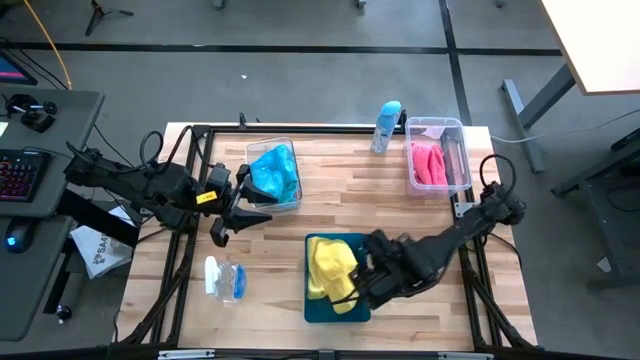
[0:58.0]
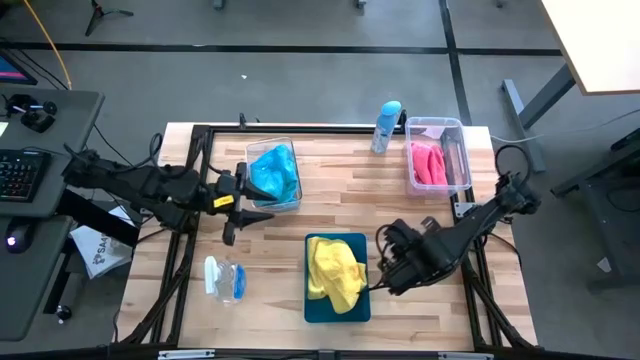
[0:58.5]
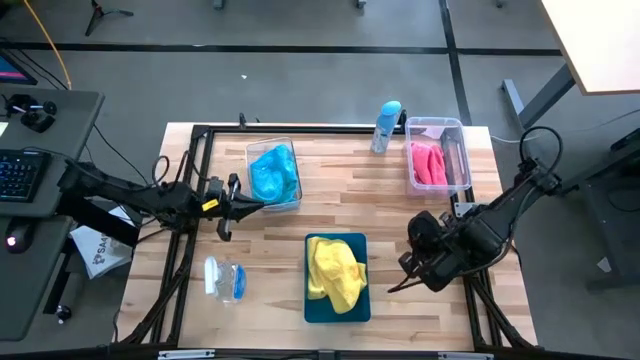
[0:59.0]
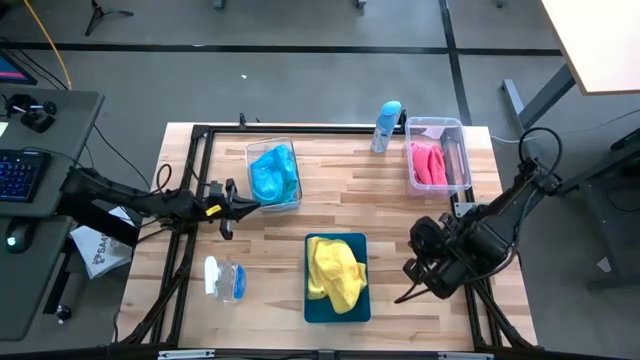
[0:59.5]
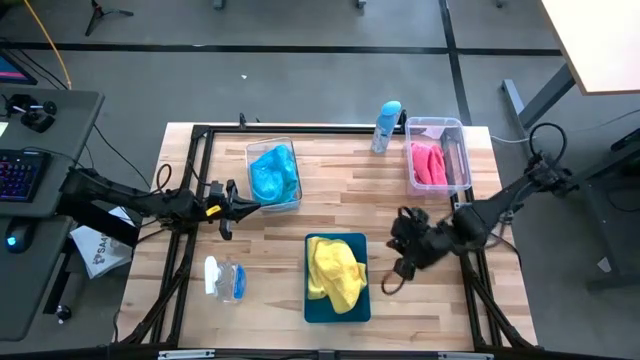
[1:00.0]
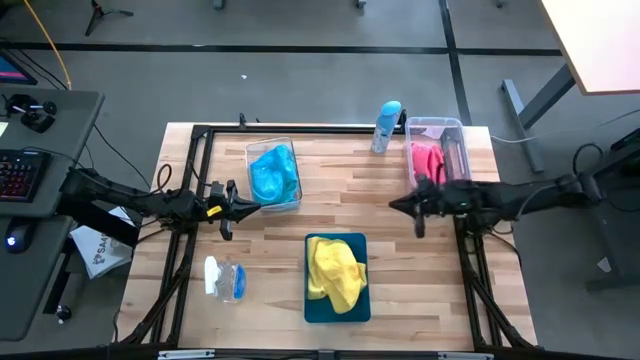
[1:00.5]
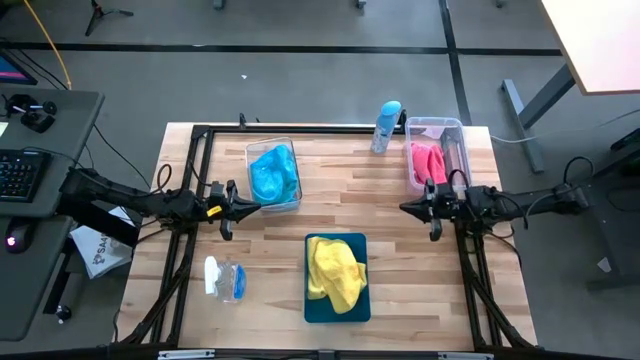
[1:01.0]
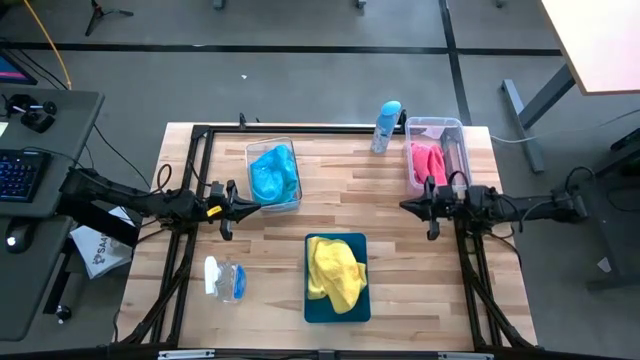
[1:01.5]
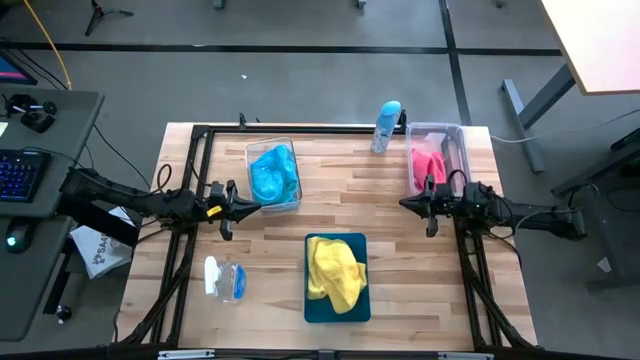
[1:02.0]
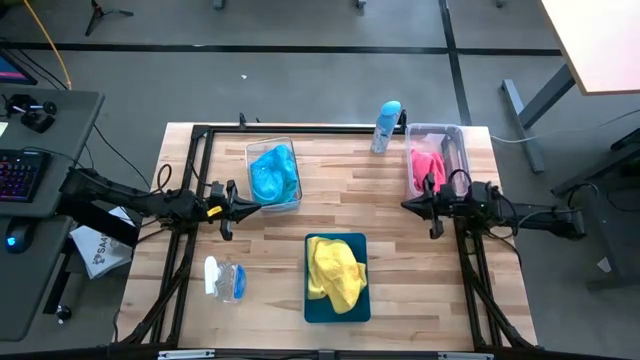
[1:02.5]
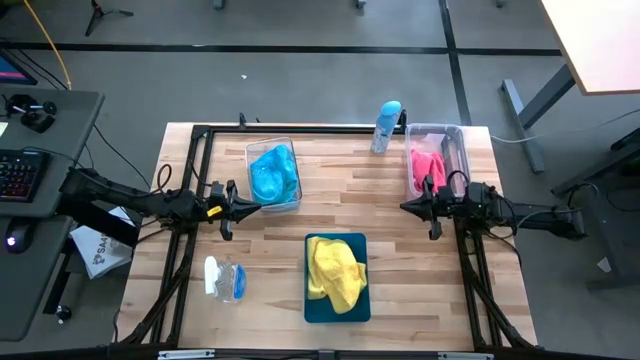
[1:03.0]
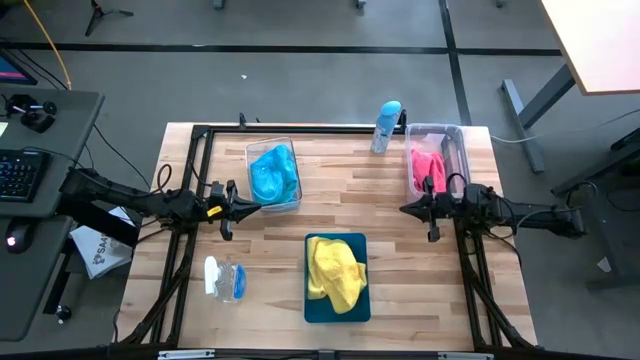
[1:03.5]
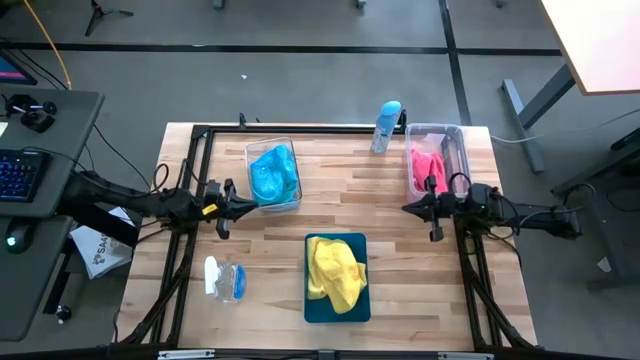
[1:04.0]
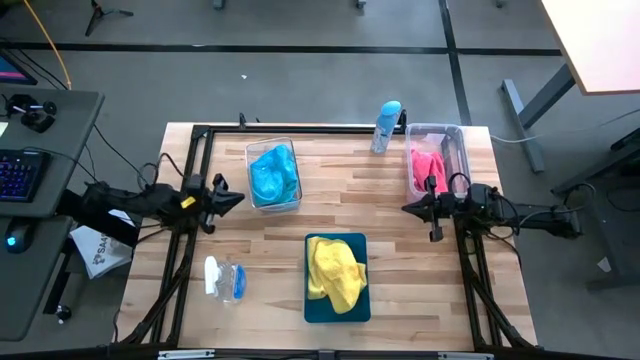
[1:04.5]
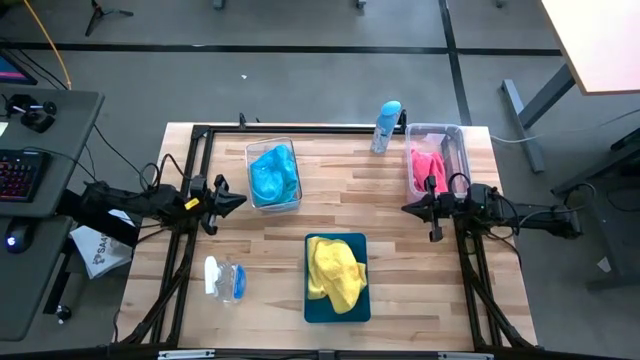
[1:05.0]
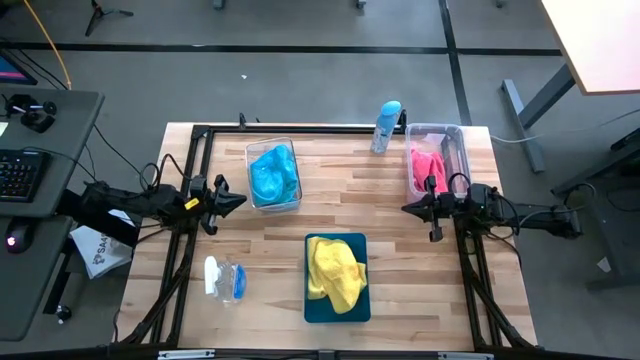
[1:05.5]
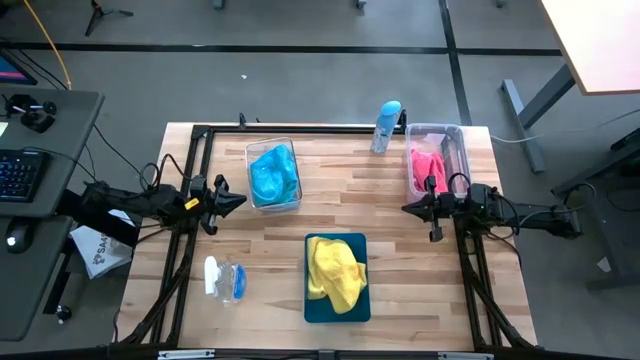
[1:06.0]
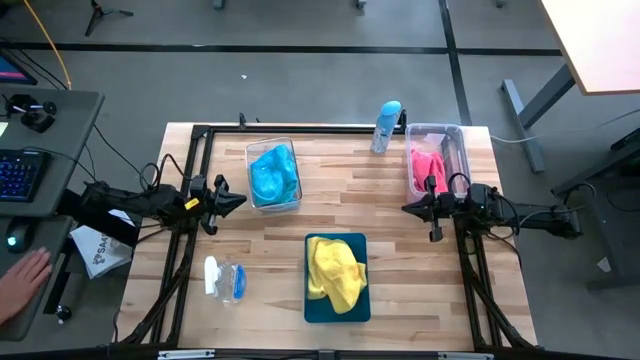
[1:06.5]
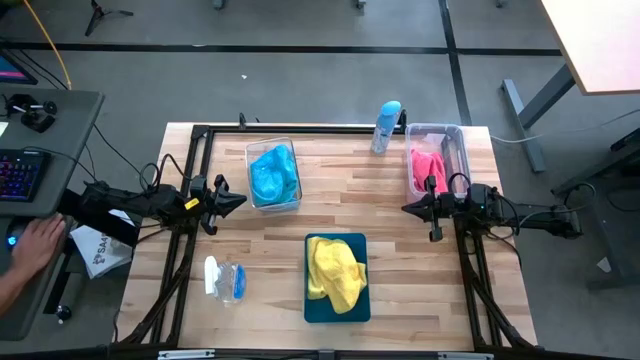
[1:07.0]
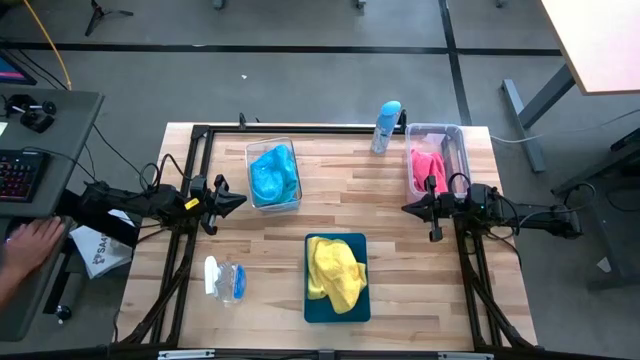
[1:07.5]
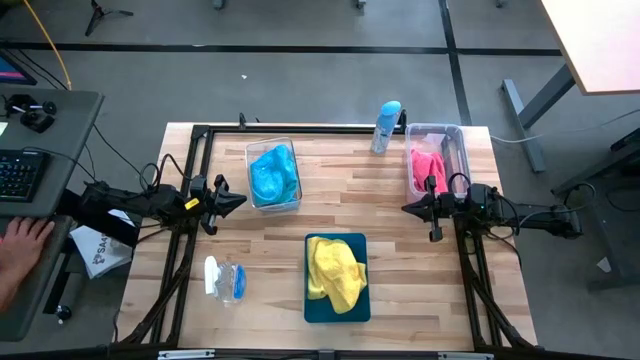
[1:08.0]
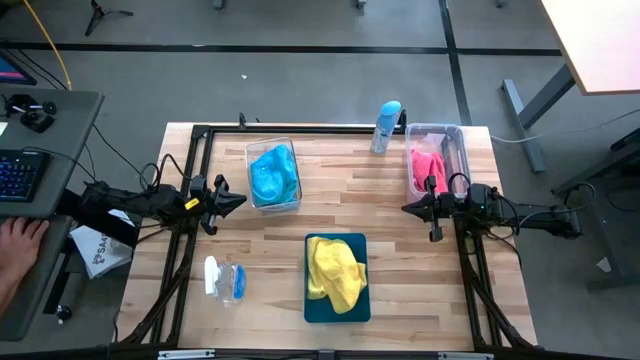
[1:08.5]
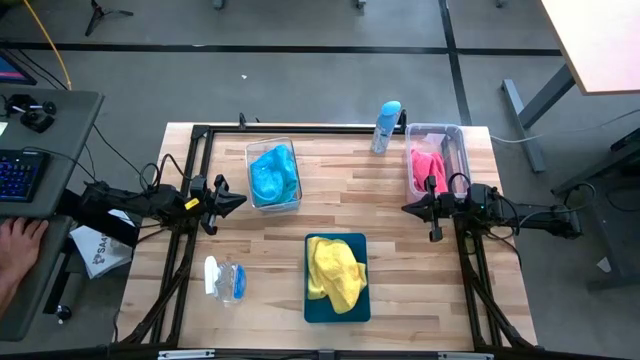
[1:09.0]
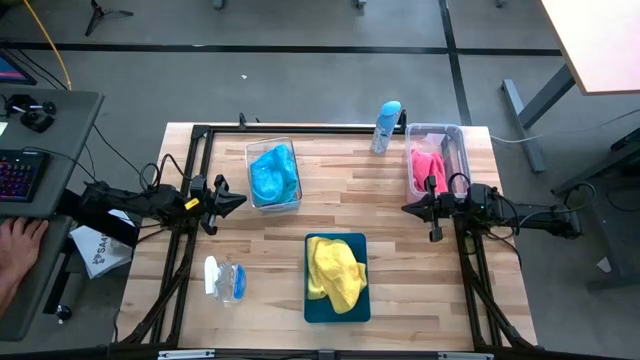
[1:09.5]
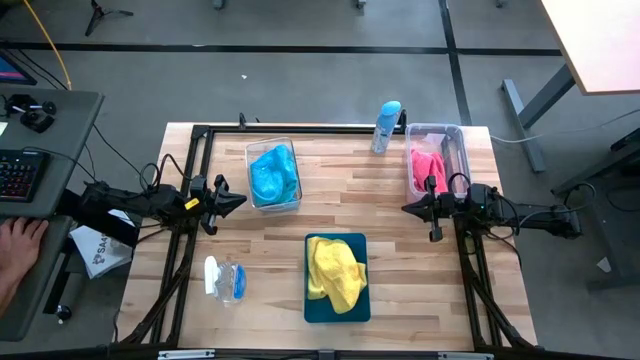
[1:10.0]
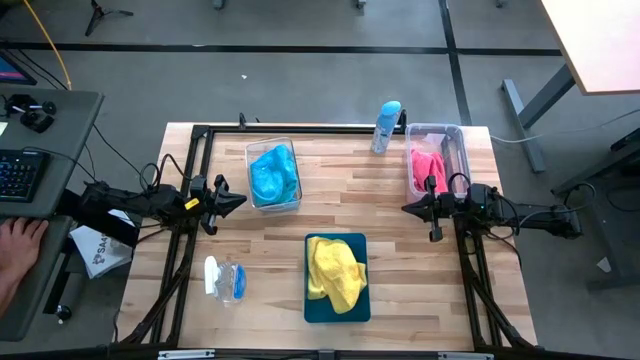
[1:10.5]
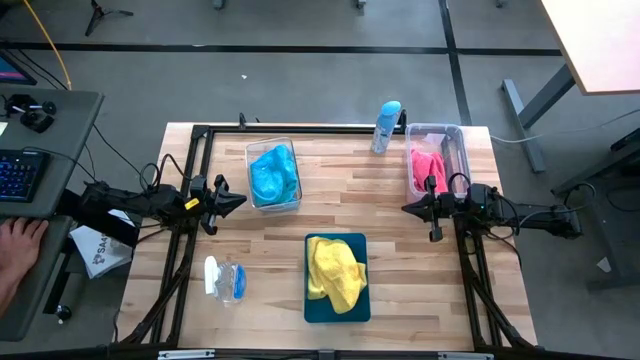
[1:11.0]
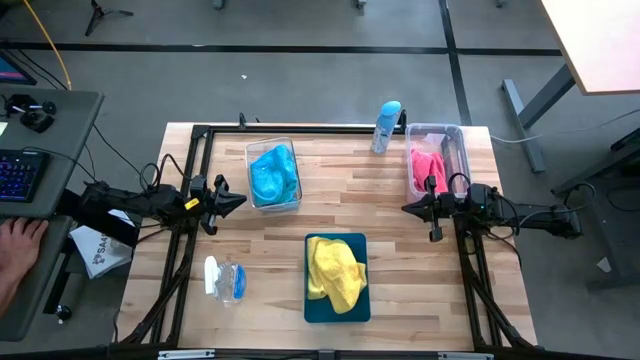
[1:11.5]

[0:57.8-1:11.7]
Task: Sort microfiber towel by color & place in baskets
Return to Home Position

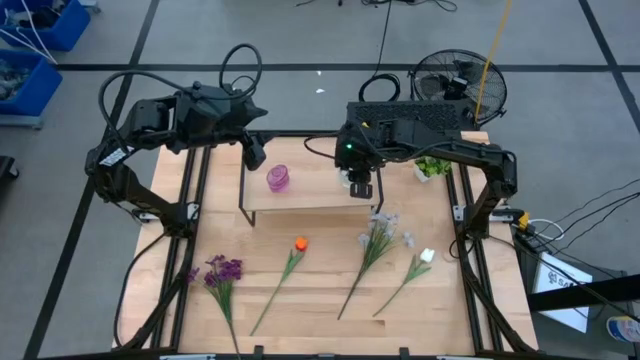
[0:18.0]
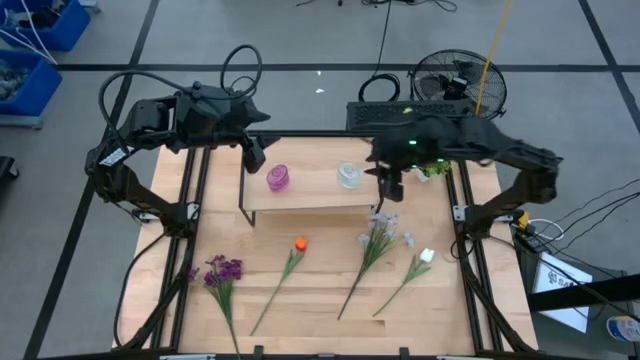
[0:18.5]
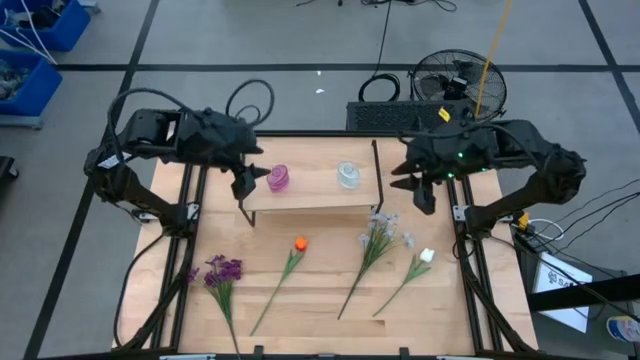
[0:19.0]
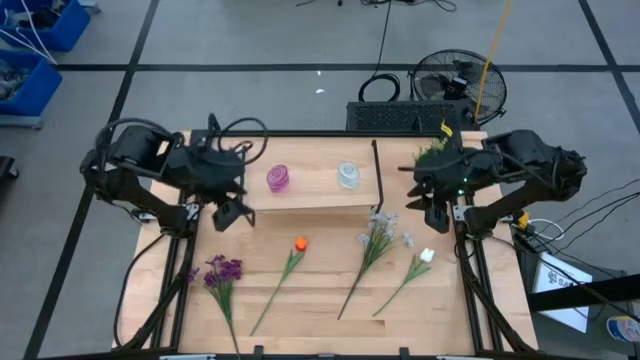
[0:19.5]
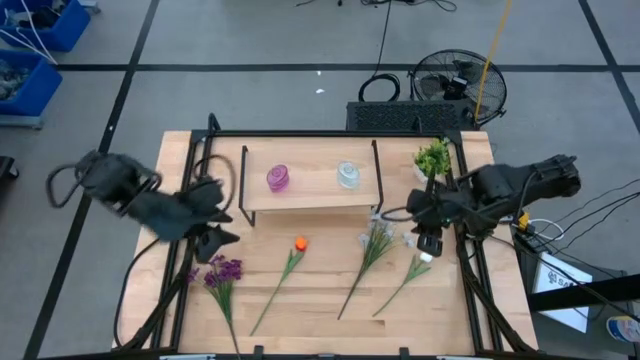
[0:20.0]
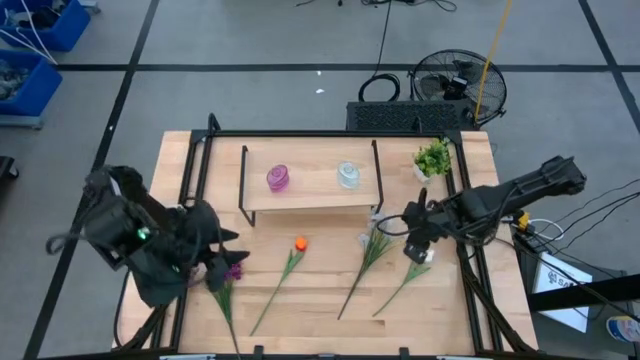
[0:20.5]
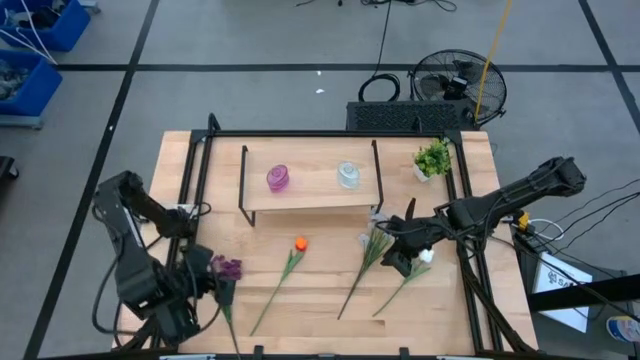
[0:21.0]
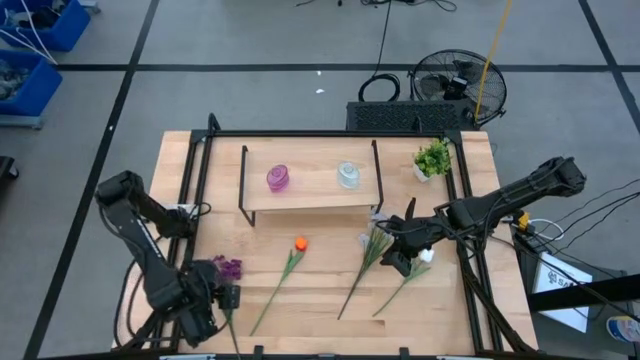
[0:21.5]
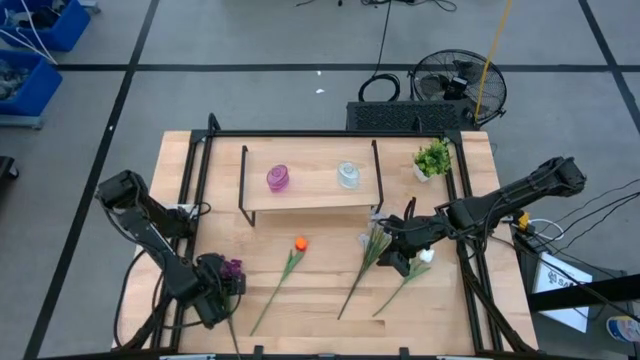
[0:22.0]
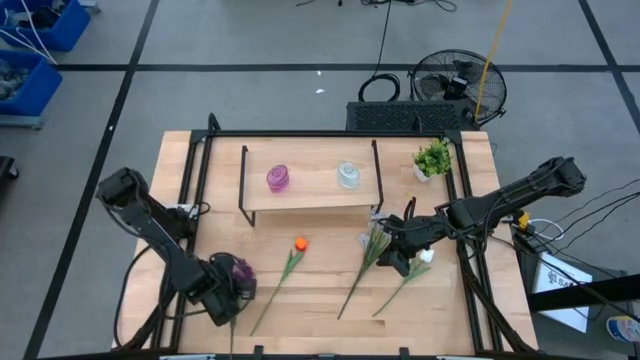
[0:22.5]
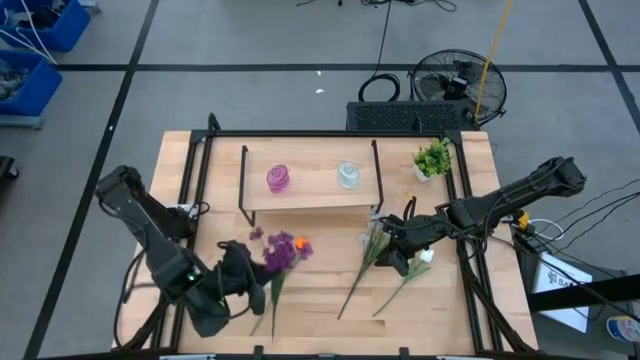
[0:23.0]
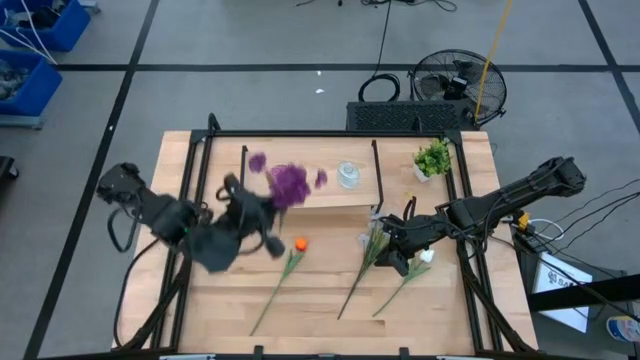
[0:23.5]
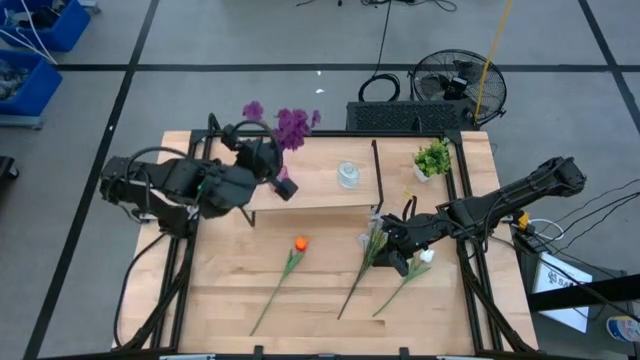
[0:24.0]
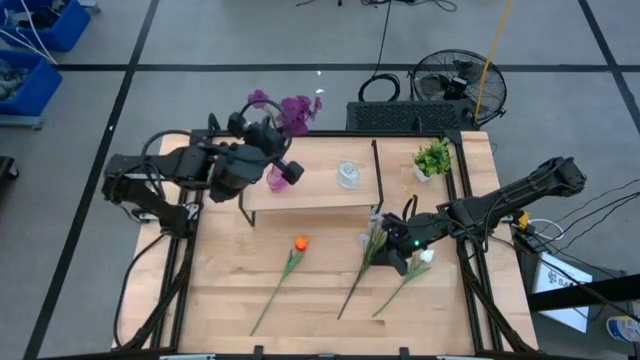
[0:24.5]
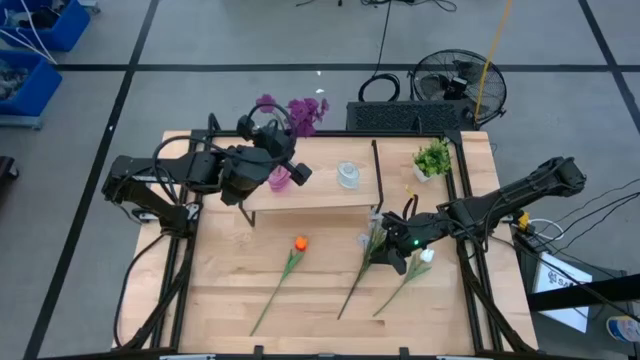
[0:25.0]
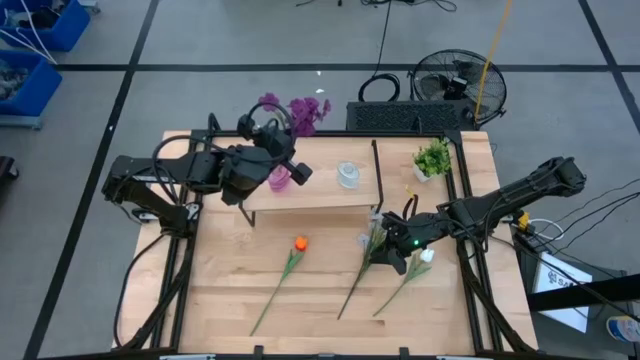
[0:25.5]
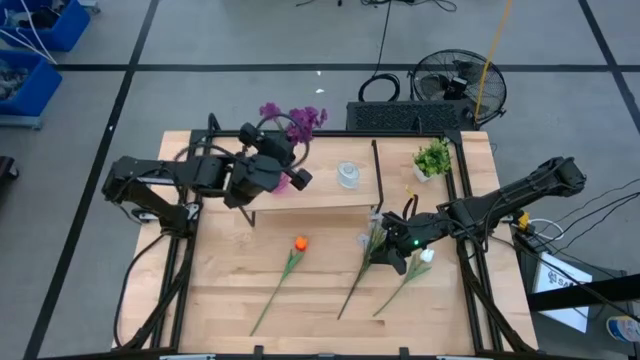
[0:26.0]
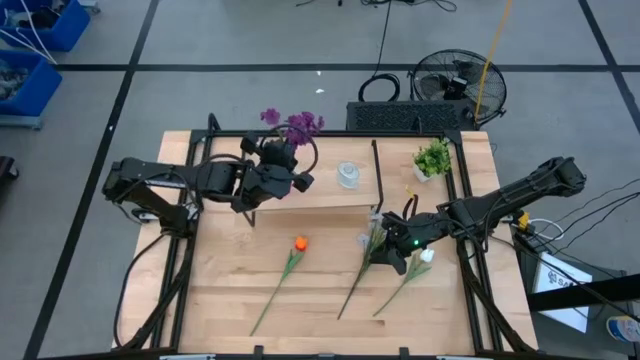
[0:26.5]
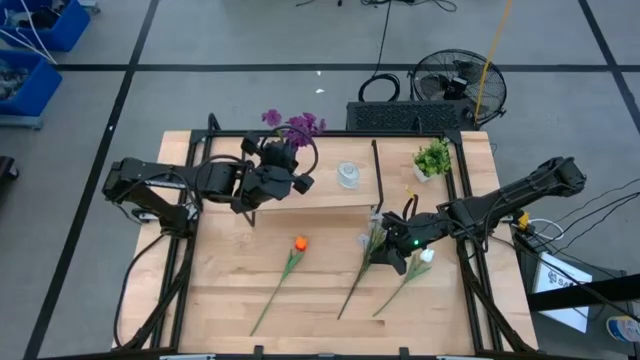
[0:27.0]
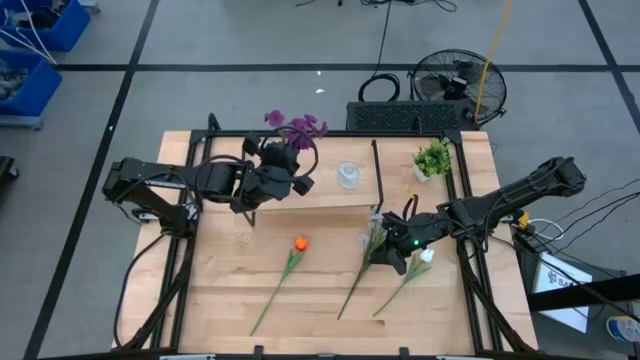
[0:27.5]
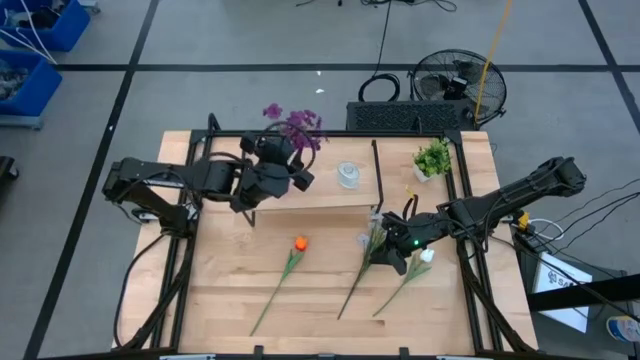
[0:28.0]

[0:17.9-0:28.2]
Task: Pick and place flowers into a vace then onto a shelf
Put the violet flowers into the violet vase on the shelf
